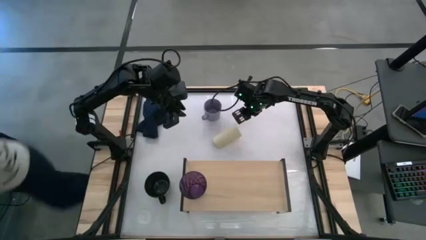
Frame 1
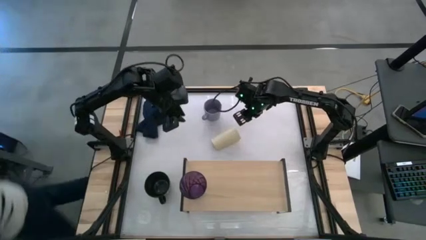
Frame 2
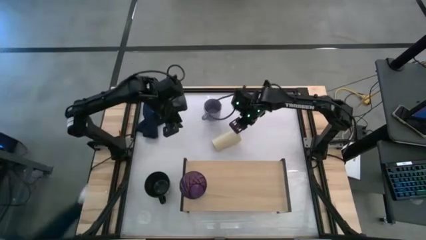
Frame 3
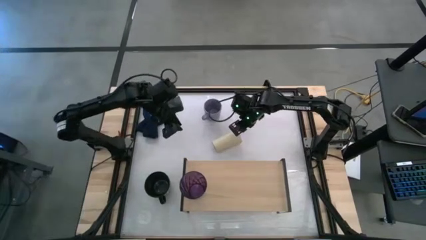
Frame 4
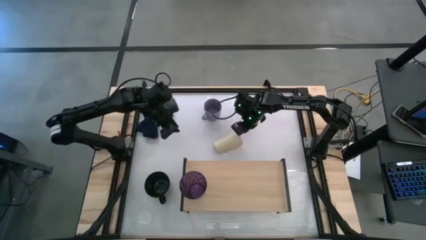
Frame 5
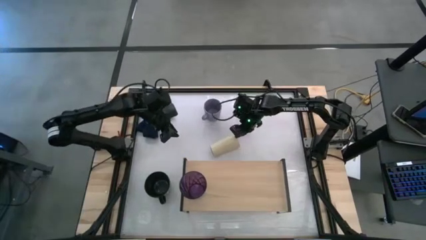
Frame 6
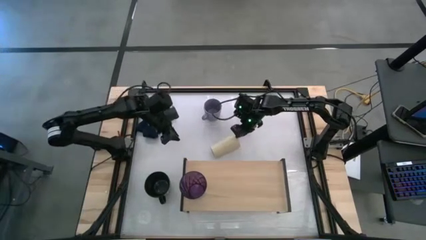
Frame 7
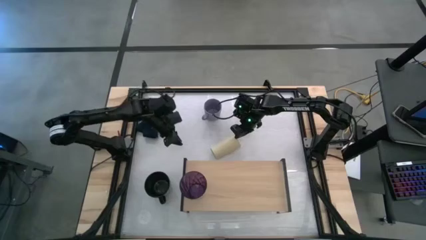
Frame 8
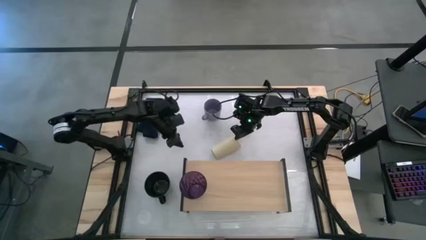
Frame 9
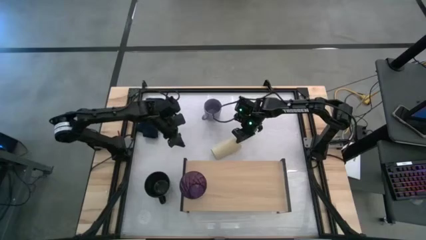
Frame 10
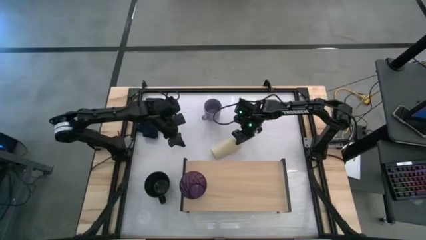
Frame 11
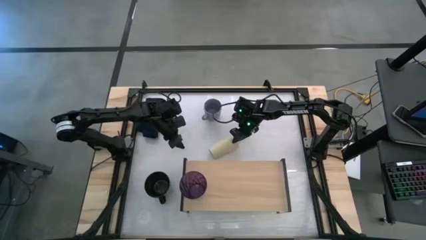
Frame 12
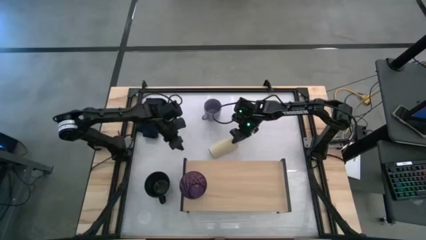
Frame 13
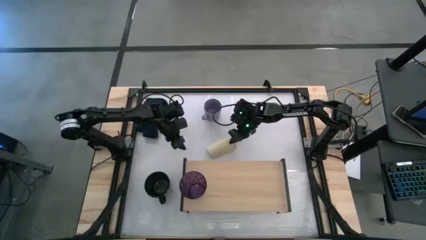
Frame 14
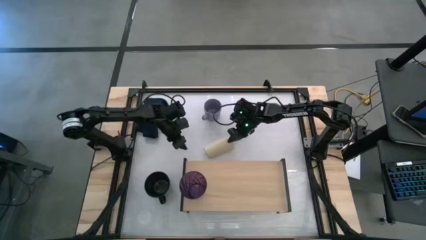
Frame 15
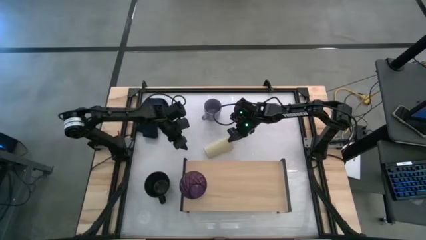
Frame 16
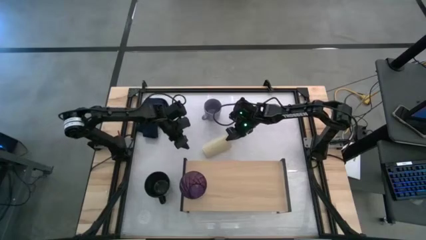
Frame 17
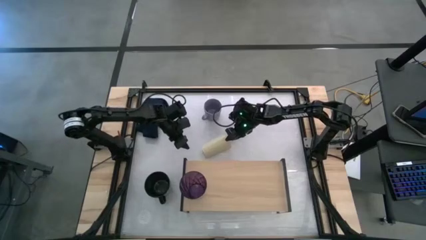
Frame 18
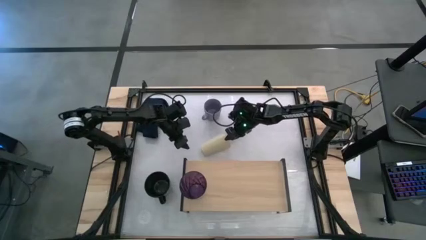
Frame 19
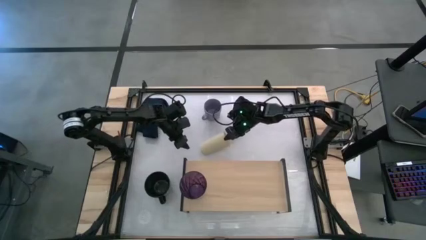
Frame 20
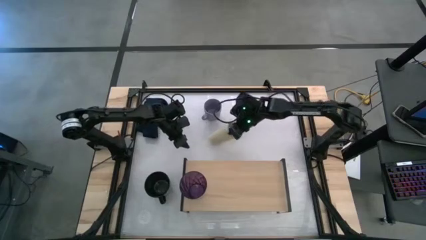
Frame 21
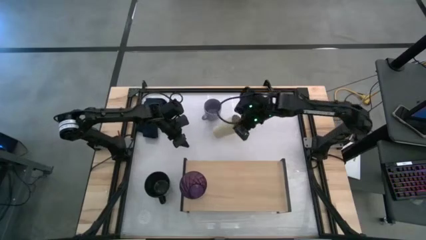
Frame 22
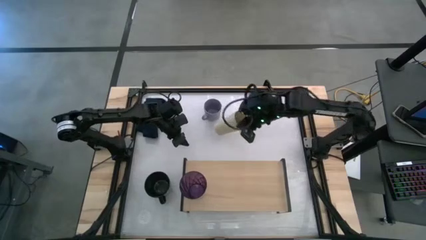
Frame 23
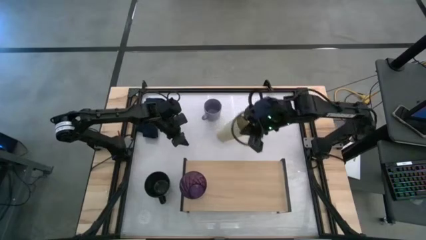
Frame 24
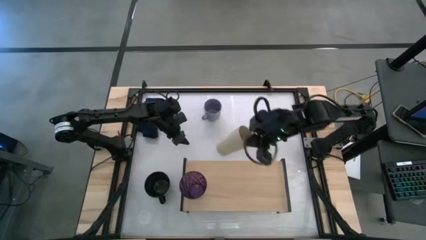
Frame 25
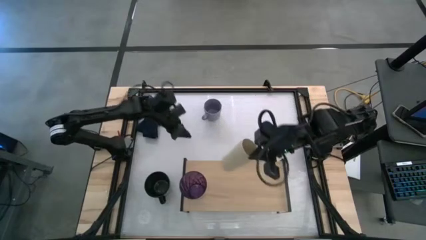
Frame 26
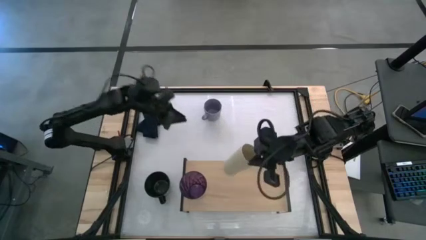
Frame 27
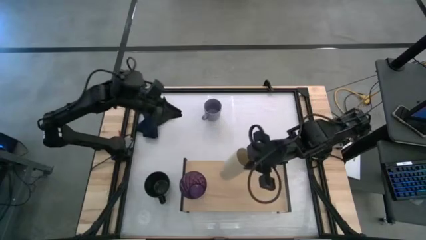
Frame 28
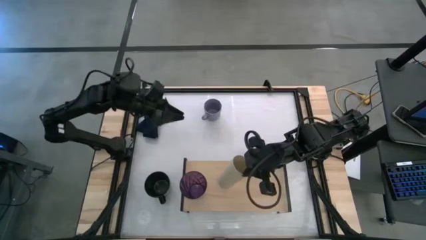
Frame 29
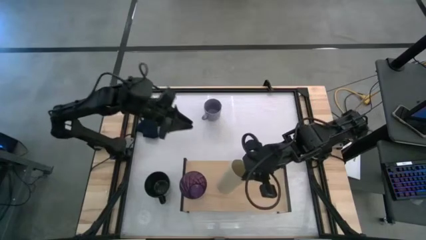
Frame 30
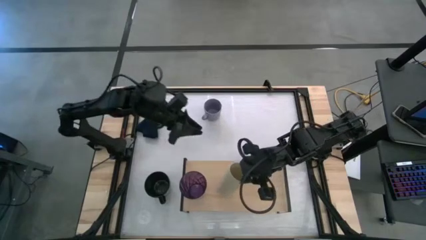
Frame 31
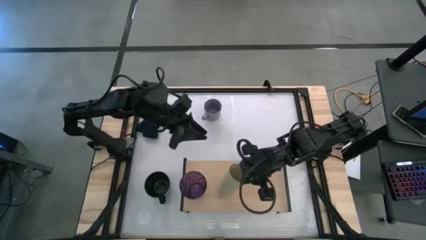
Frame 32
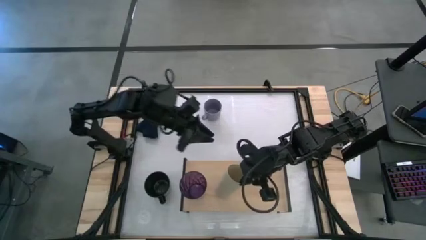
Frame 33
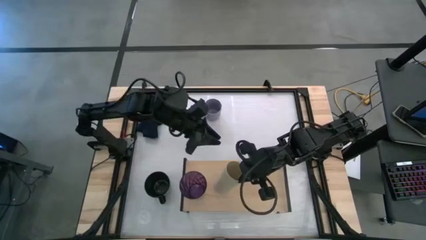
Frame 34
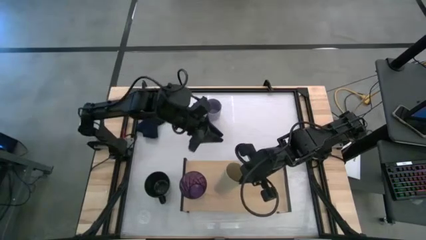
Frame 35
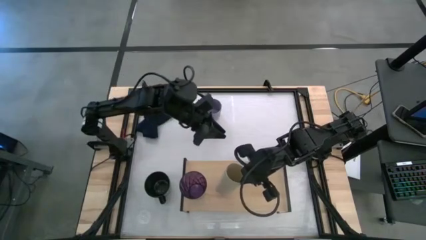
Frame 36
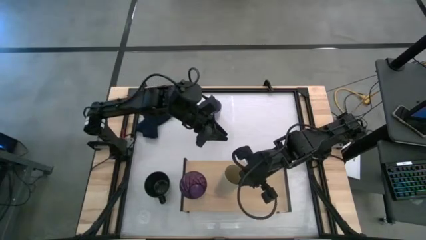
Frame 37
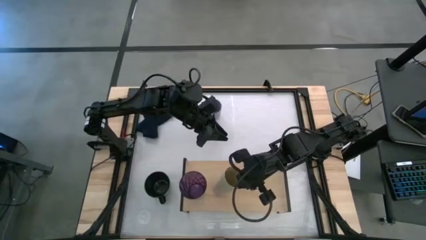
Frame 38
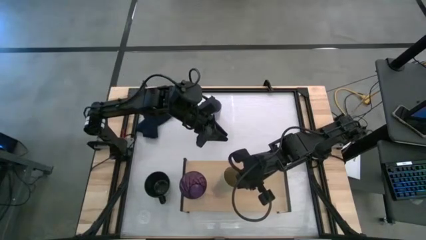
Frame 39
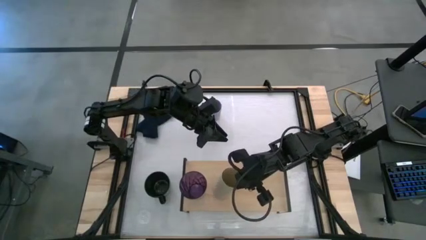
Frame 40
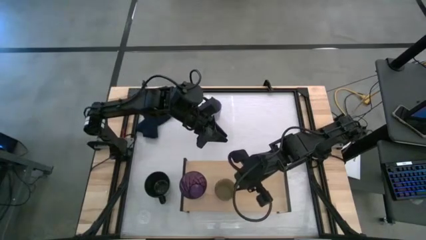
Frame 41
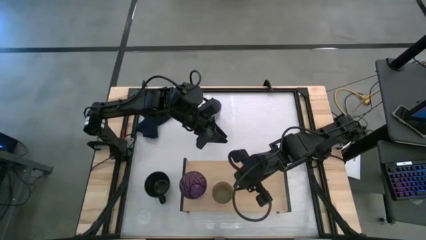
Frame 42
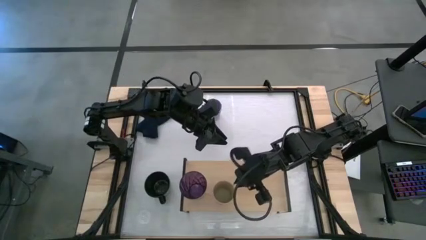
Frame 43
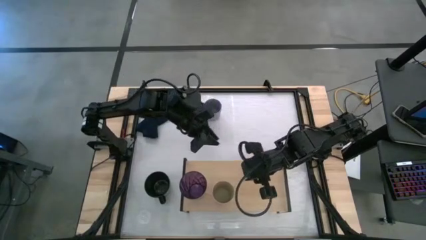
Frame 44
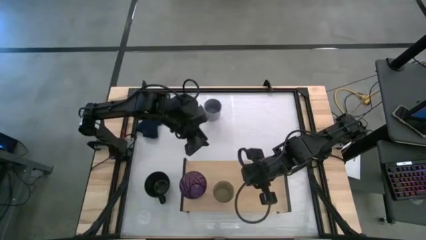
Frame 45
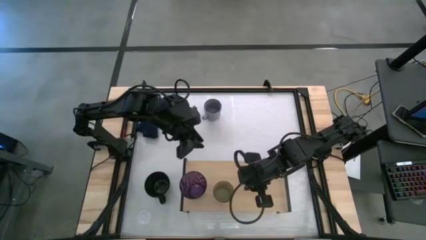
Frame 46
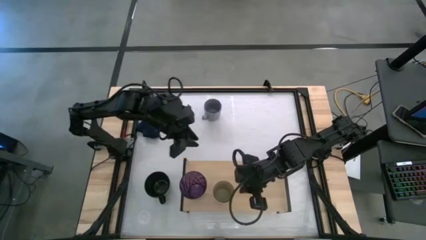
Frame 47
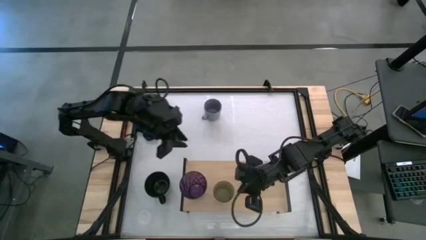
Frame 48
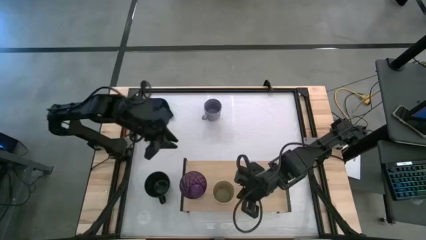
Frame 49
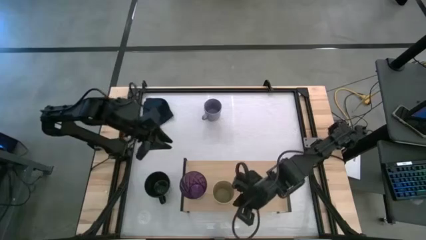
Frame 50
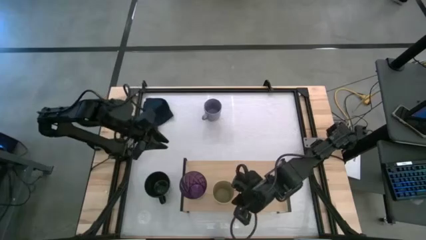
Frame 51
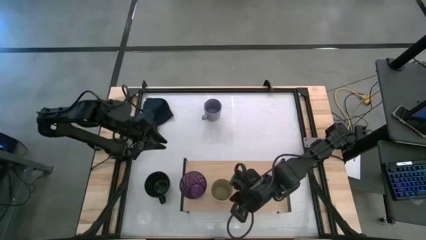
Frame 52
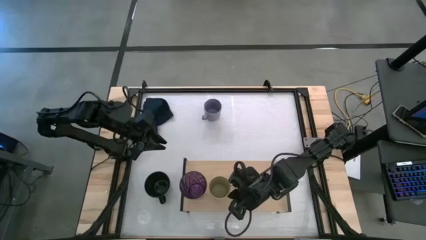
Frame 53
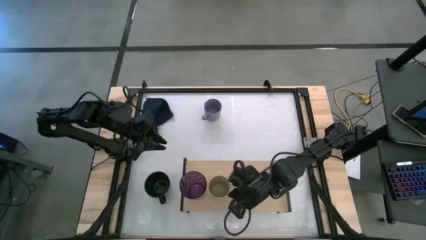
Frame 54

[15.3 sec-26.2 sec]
Task: Stack small to large cups/mugs on shelf
Put the yellow cup on the shelf
